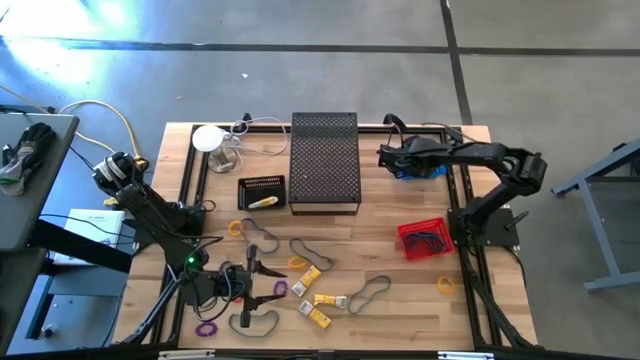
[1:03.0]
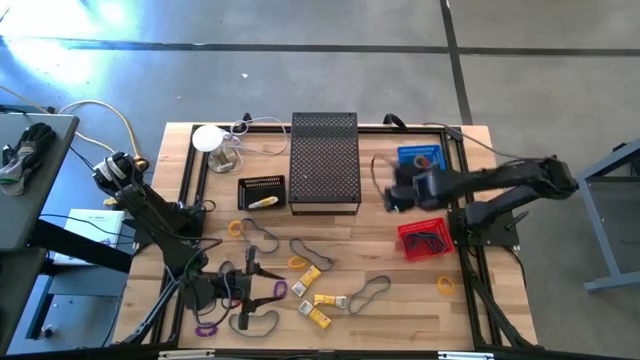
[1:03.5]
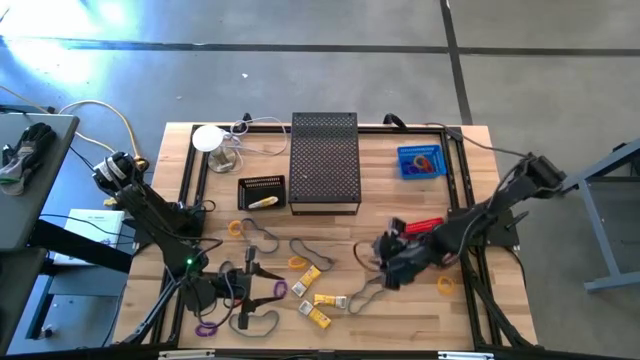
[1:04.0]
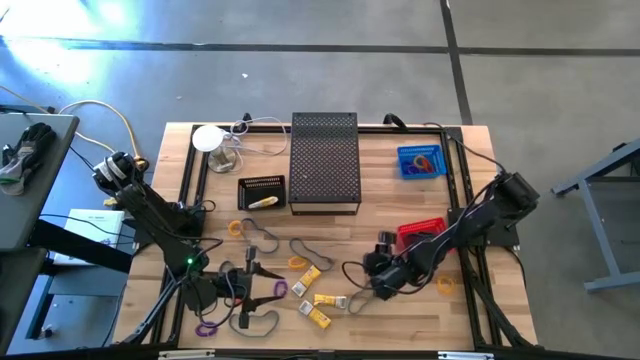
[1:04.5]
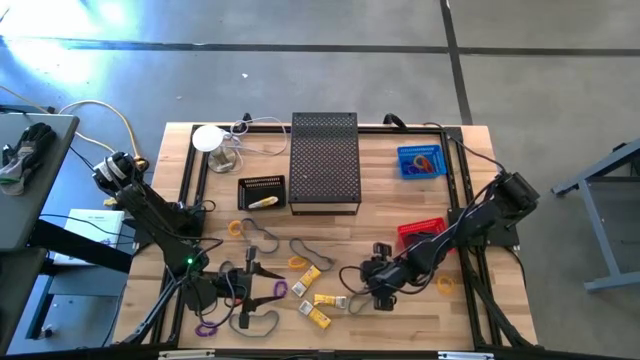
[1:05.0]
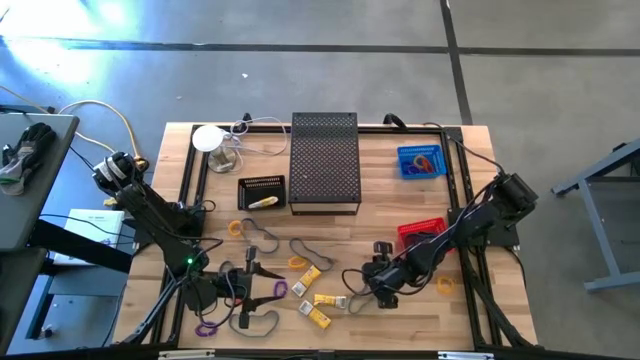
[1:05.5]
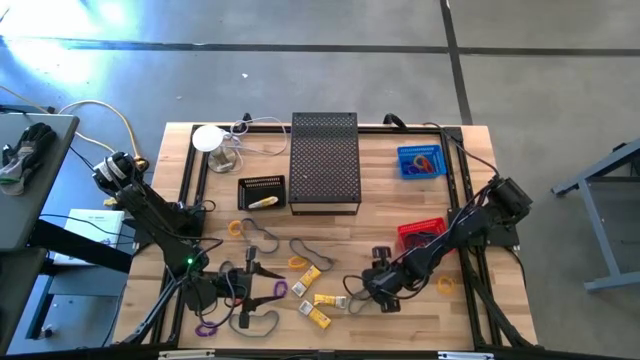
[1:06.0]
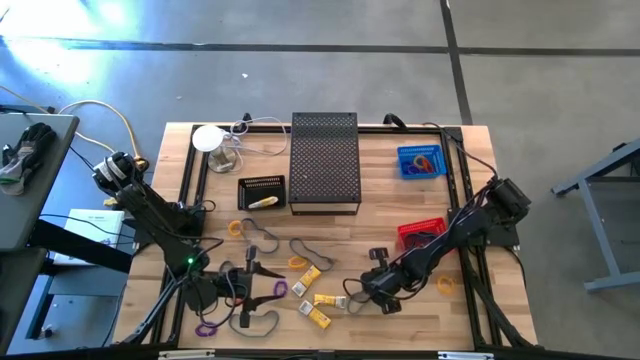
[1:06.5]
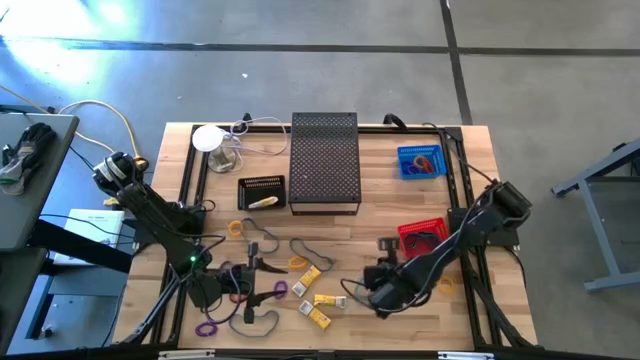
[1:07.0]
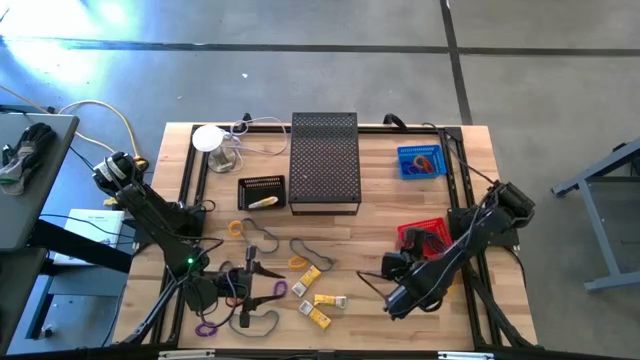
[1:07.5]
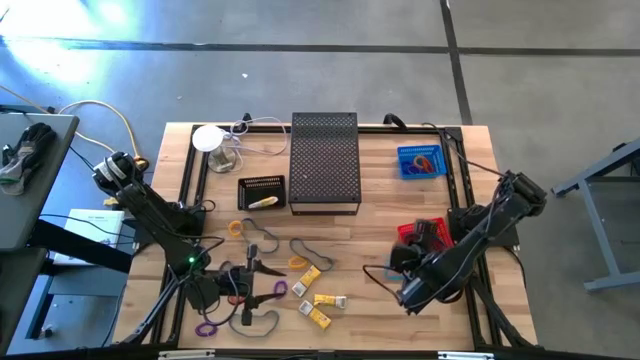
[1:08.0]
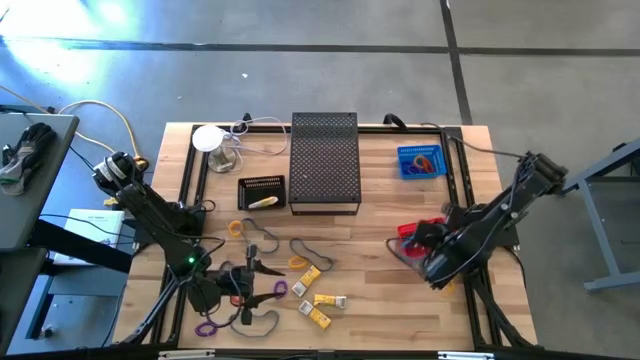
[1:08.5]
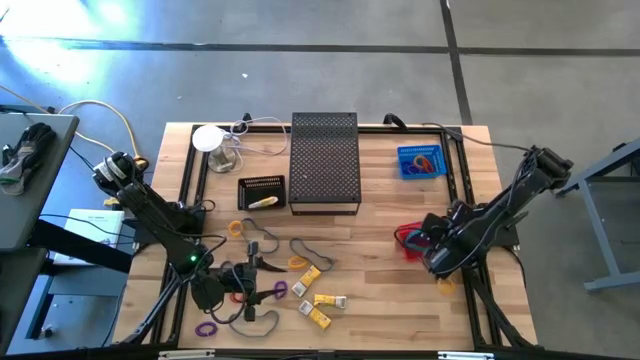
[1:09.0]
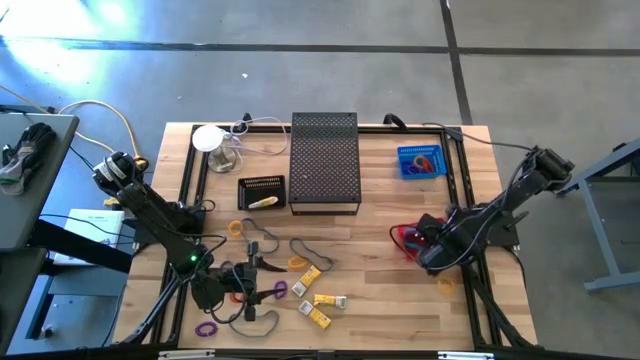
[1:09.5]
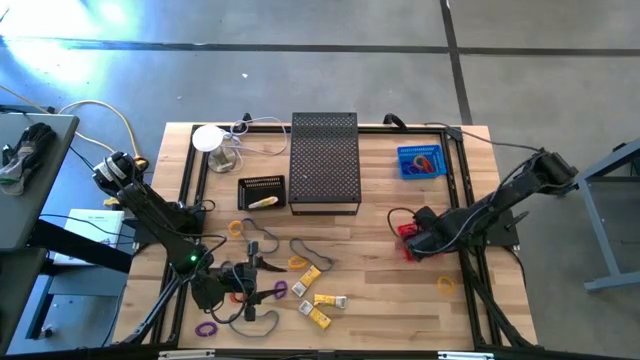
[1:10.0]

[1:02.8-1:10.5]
Task: Pick & Place Office Desk Supplies
Put the blue rubber band into the red bin

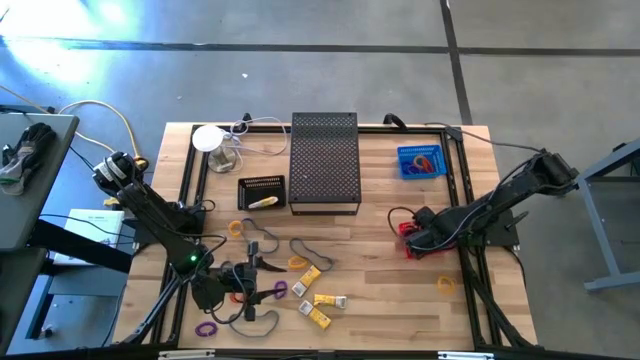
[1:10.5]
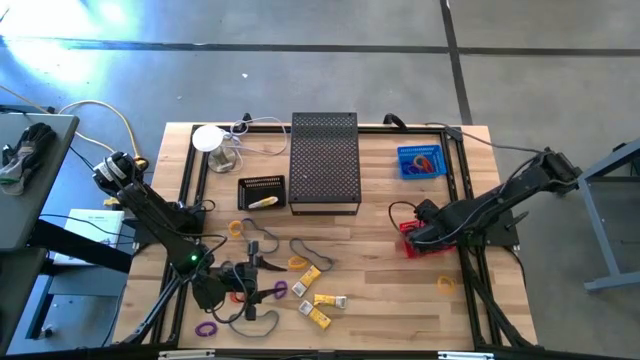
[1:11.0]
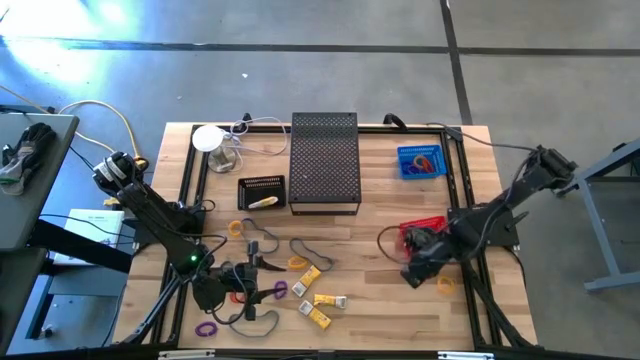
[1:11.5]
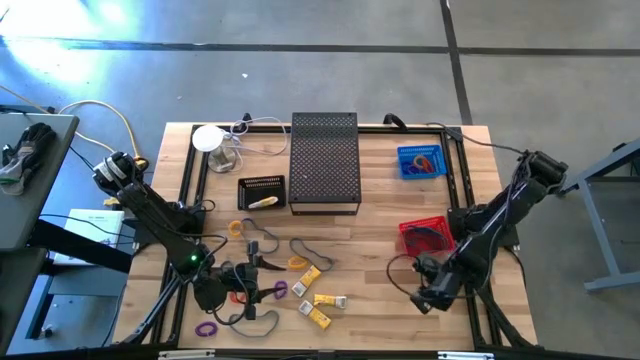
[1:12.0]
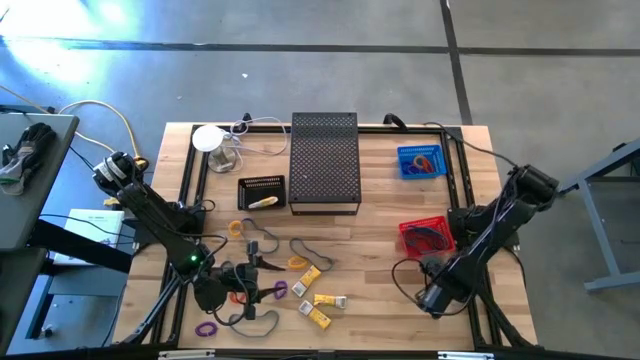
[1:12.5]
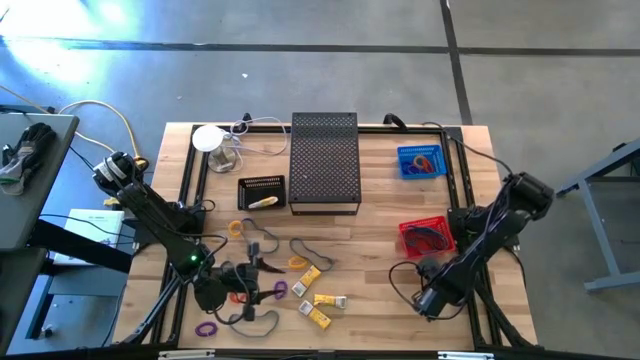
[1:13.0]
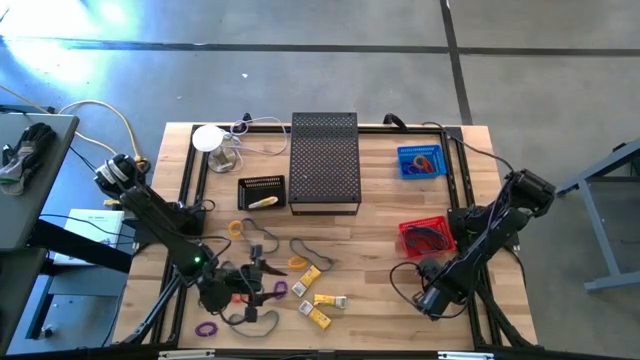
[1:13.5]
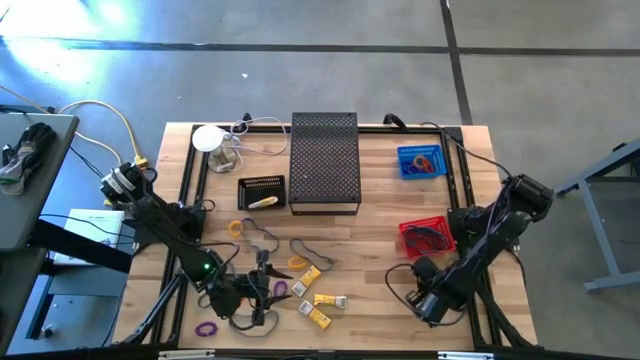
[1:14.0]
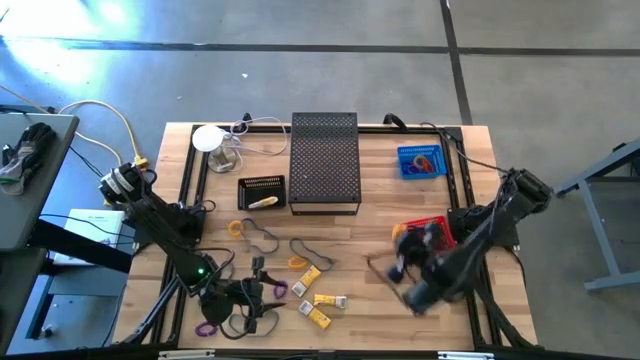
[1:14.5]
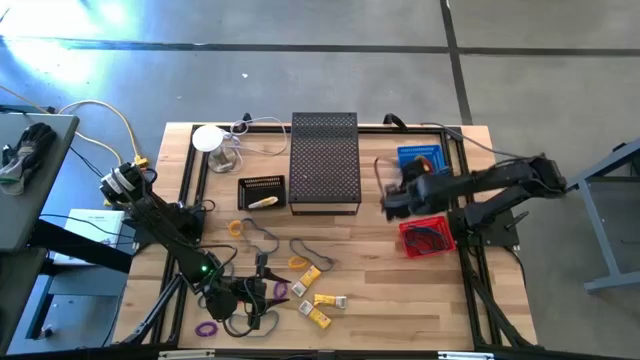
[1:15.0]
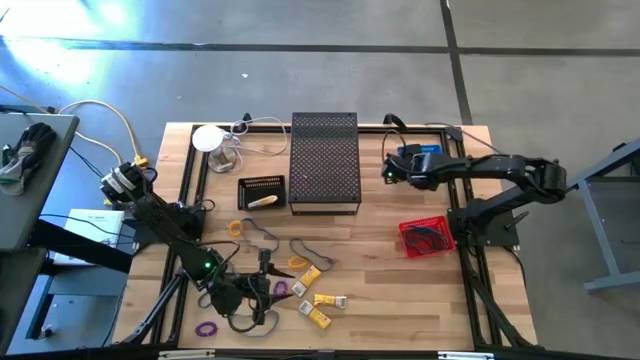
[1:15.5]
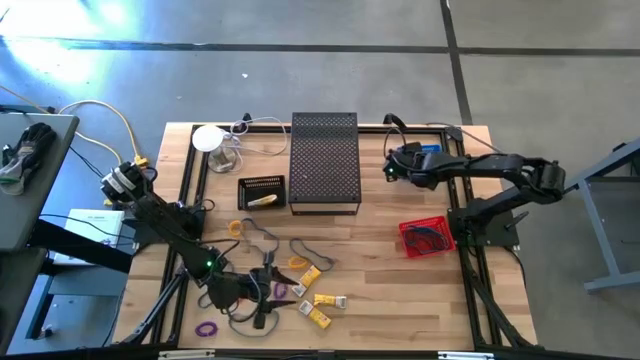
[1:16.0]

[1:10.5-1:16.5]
Put the yellow spring keychain into the blue bin

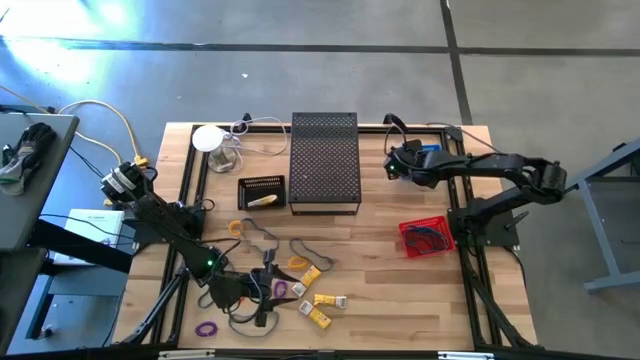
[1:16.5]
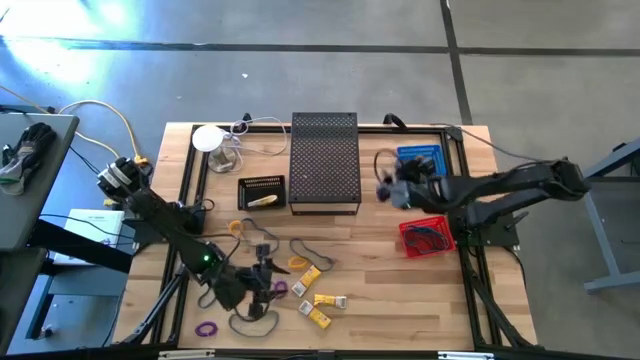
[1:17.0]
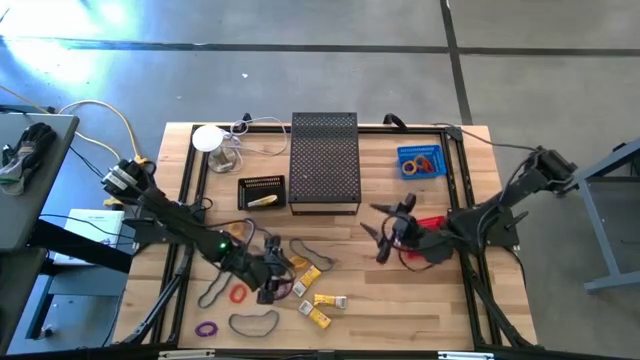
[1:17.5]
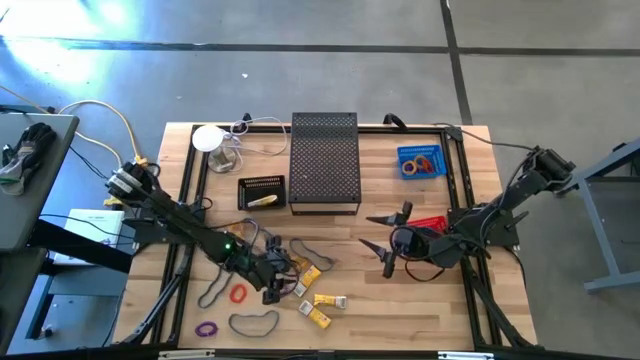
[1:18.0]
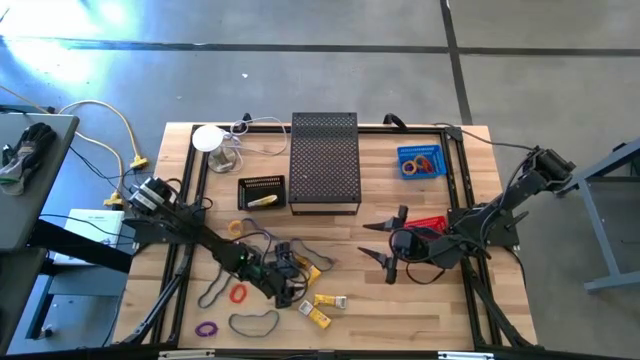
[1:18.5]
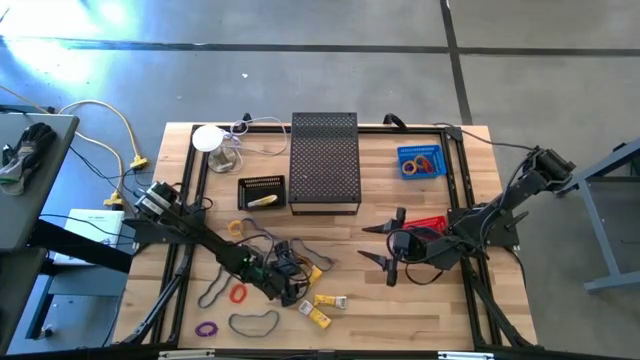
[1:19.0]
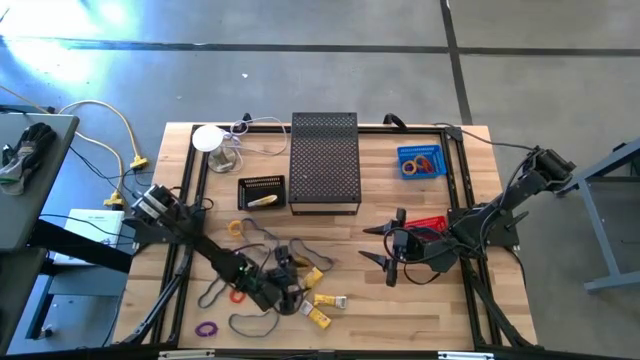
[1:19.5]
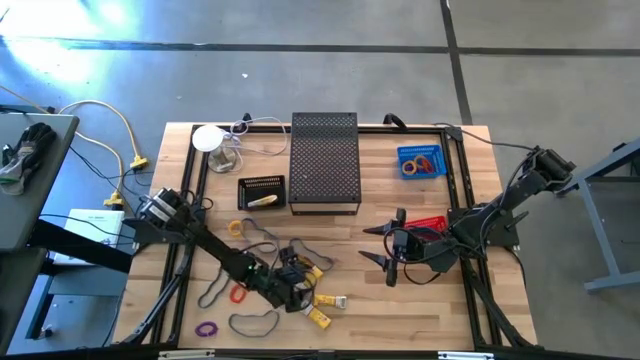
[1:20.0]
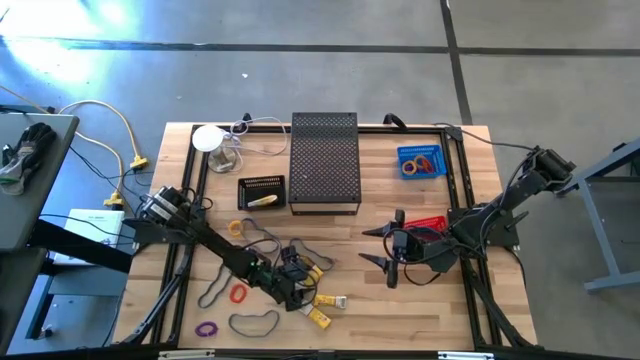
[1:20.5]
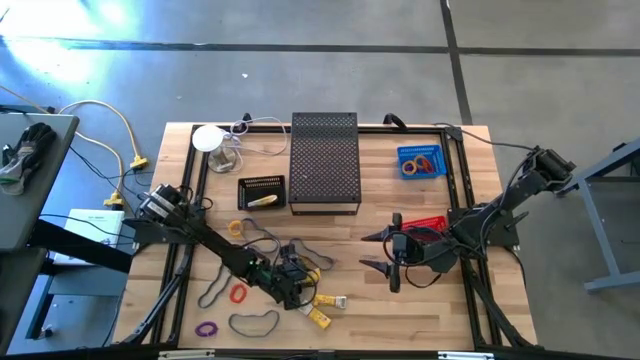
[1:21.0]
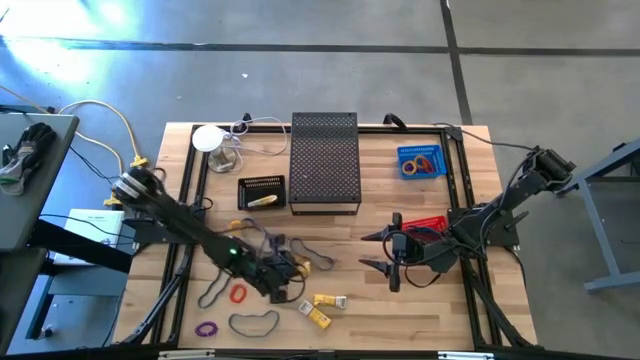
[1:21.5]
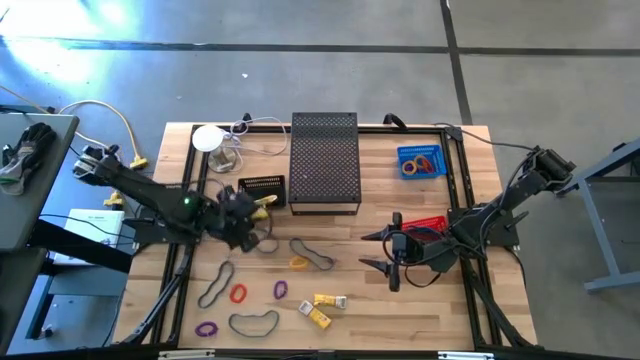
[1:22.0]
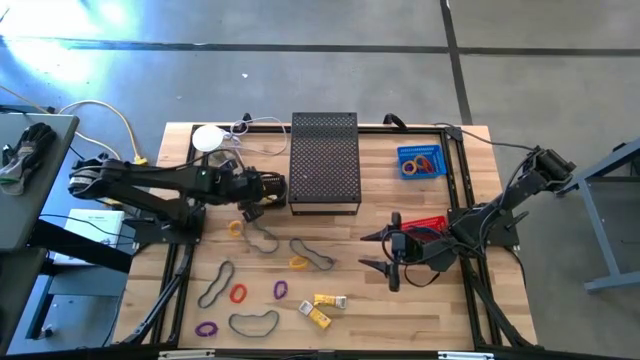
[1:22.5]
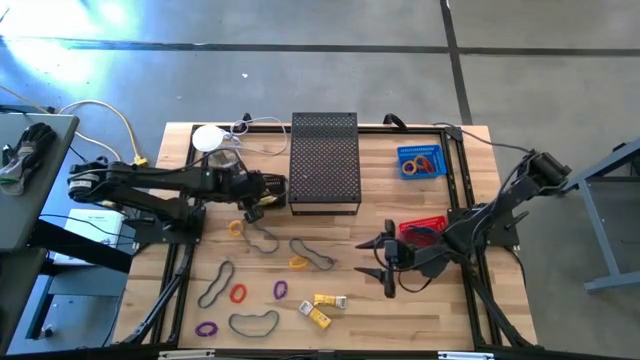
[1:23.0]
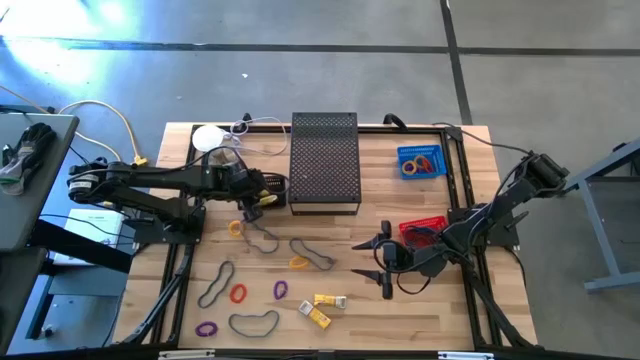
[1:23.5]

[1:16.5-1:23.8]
Put the yellow crayon box into the black bin

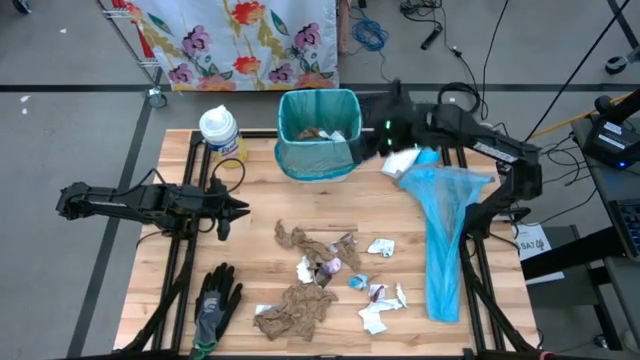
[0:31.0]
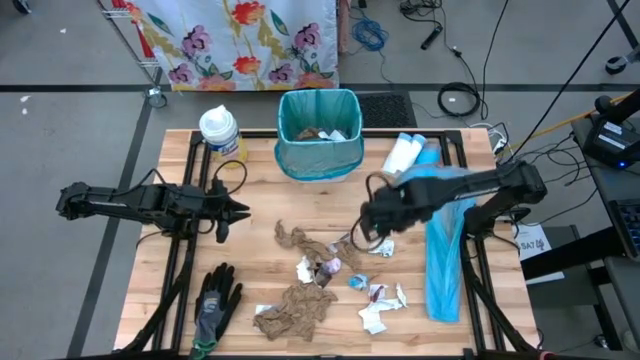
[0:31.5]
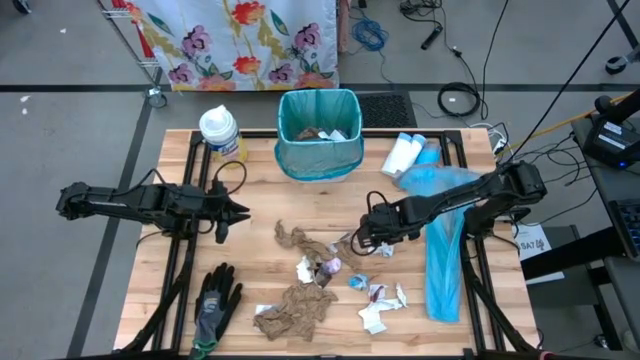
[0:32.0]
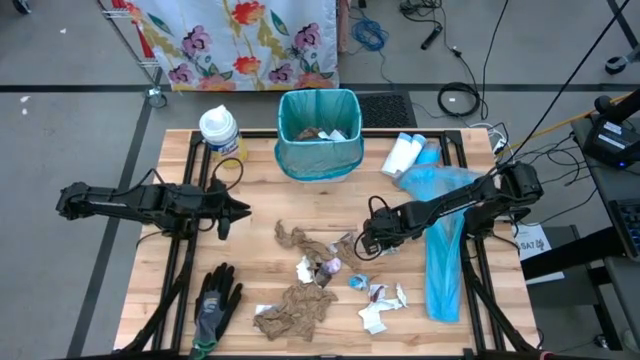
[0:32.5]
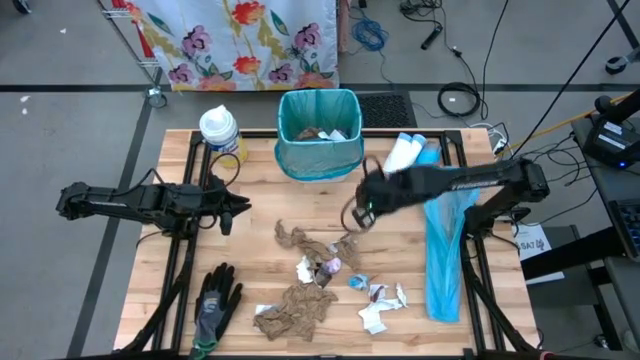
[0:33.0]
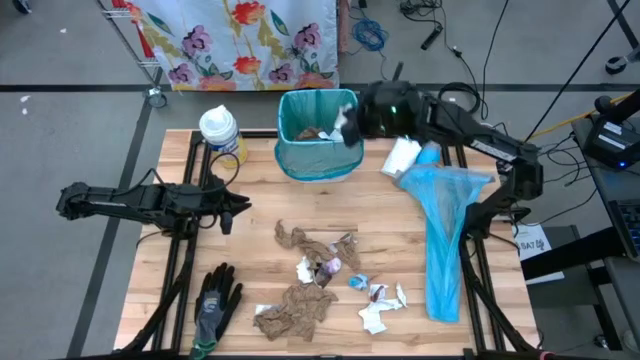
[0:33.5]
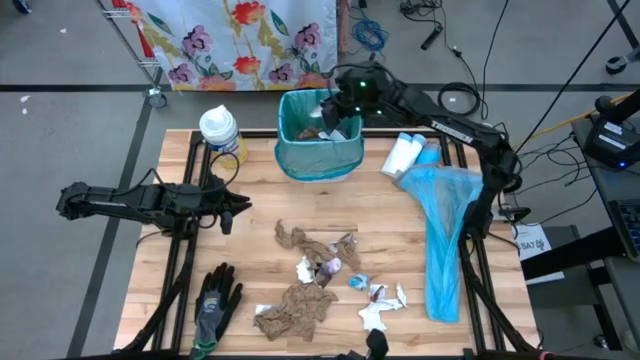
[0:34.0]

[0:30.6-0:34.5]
Task: place trash/remove bag and relplace
Put the white paper into the white trash bin
